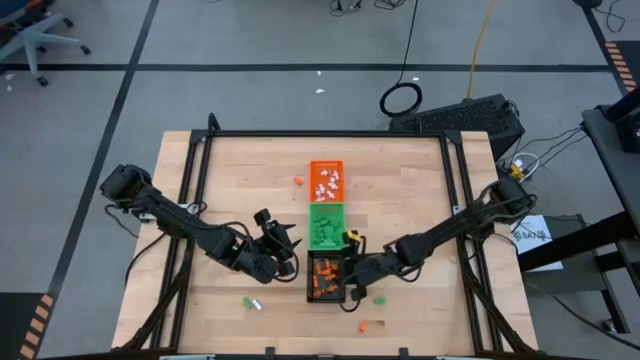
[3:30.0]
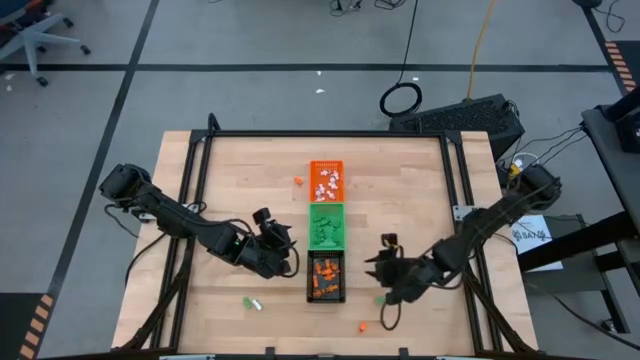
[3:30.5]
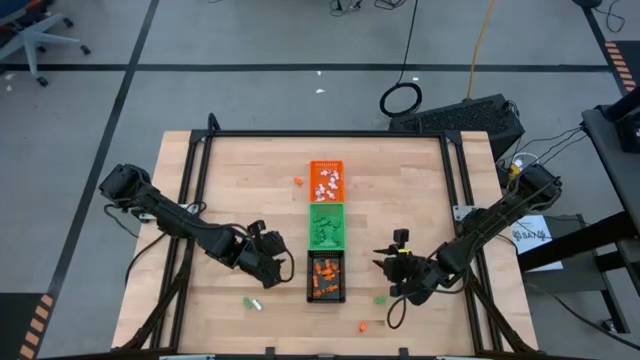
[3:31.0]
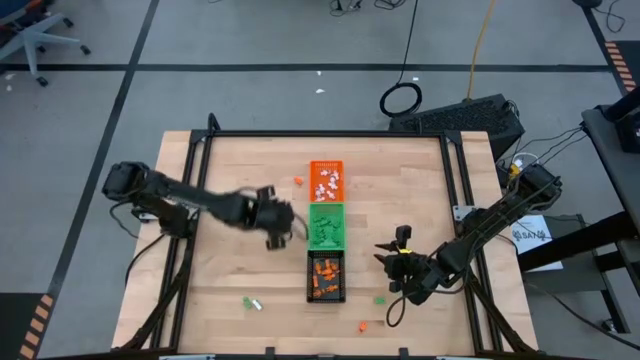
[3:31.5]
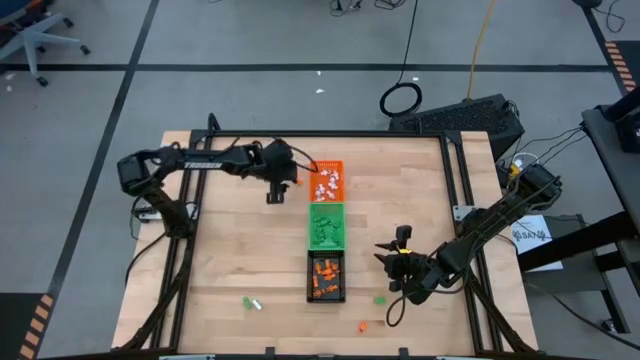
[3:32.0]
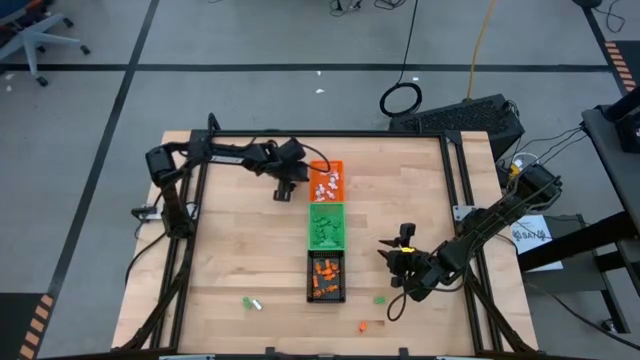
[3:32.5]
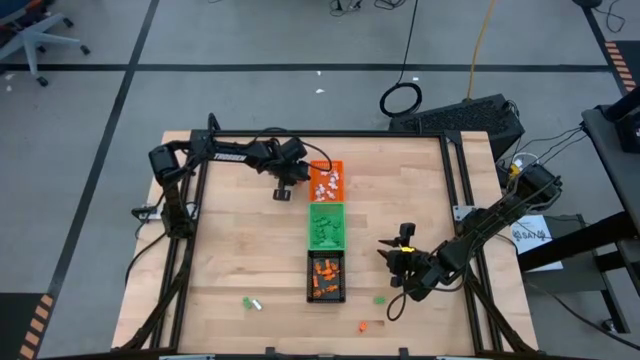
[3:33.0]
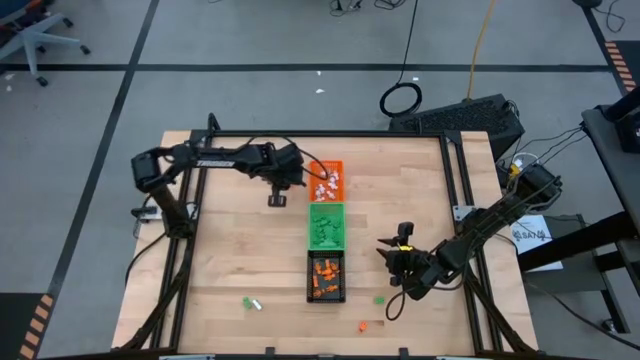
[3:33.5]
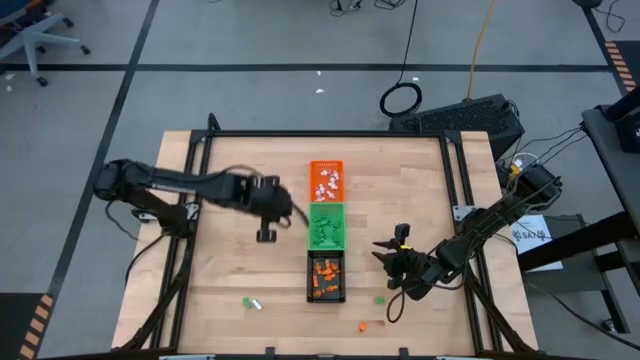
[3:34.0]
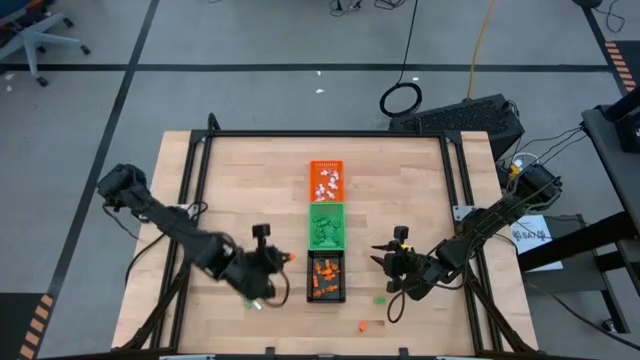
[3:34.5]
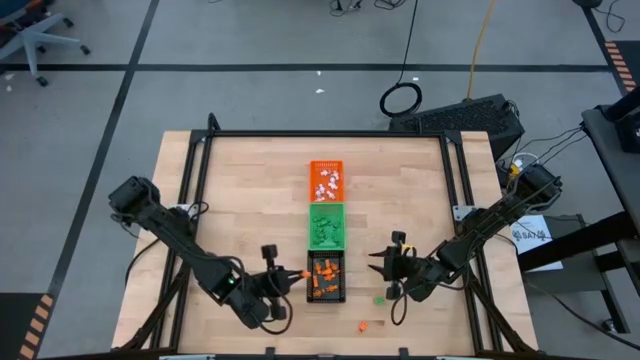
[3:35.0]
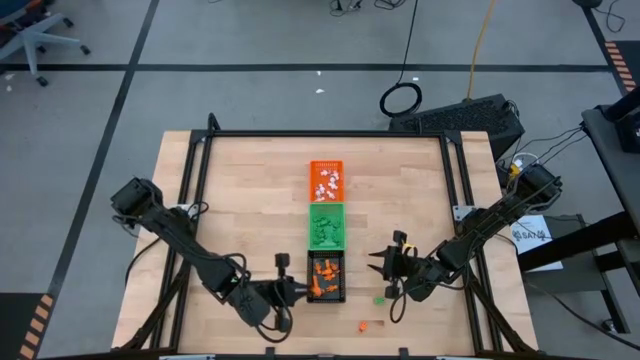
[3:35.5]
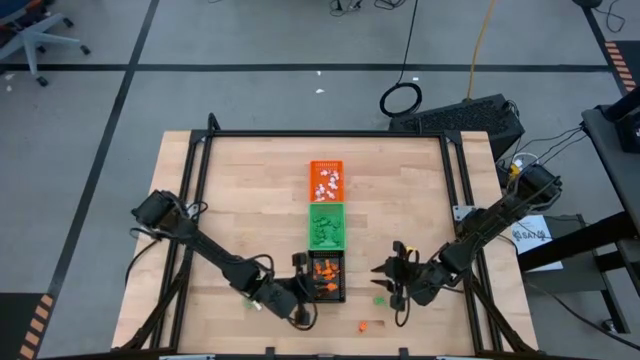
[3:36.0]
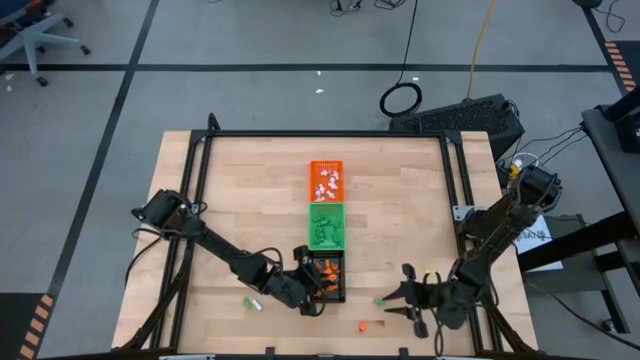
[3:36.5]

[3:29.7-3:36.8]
Task: Sort Halloween decoration
Put the orange skeleton toy into the black bin

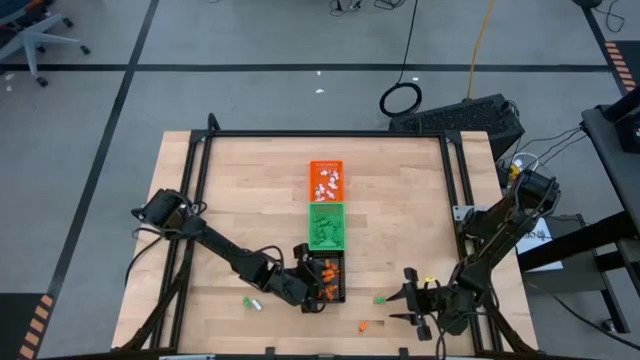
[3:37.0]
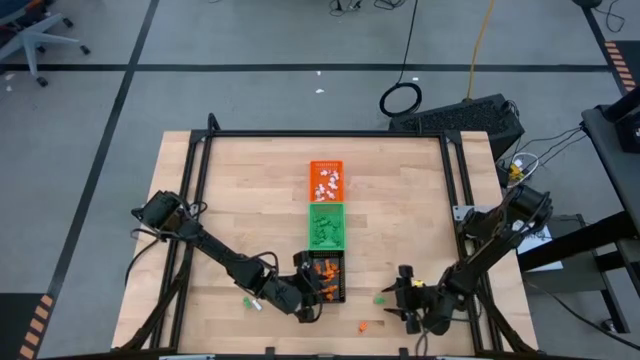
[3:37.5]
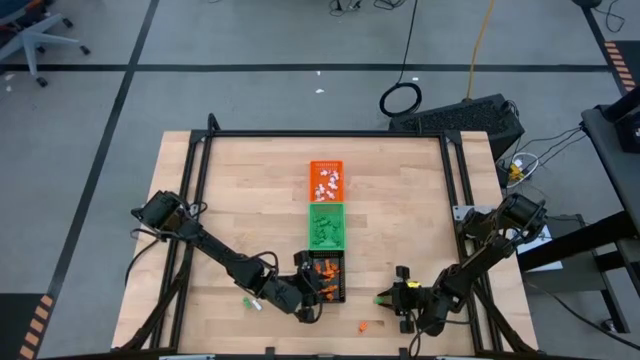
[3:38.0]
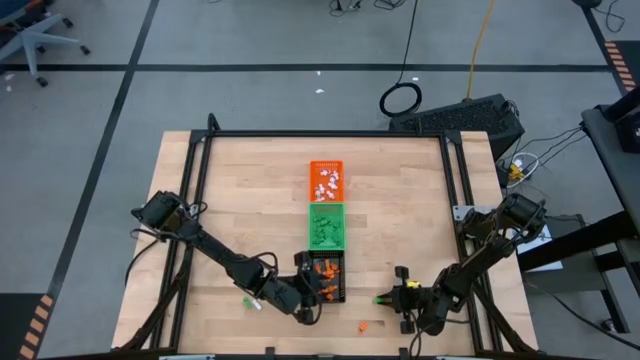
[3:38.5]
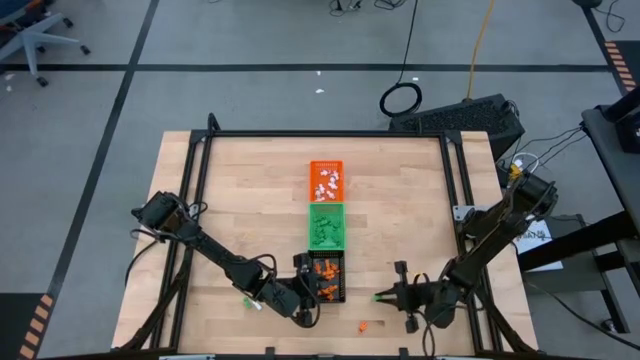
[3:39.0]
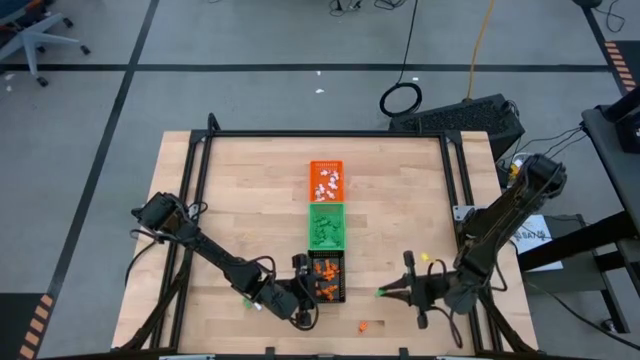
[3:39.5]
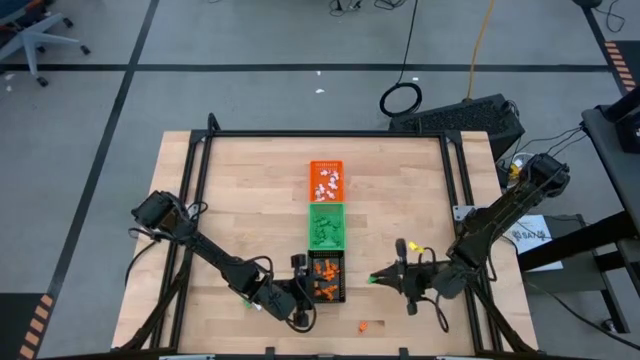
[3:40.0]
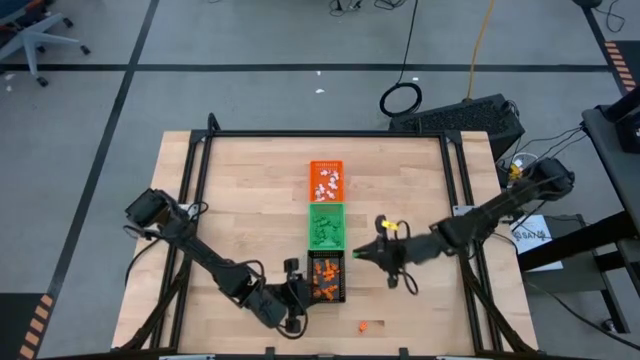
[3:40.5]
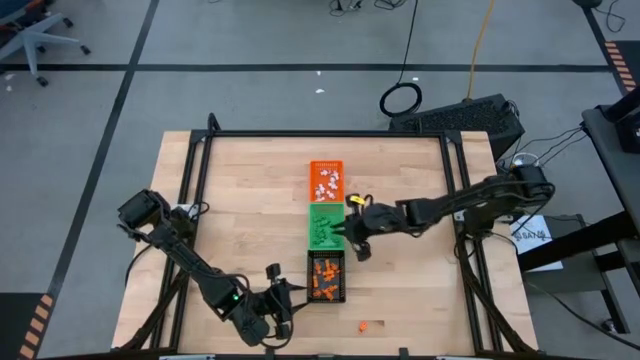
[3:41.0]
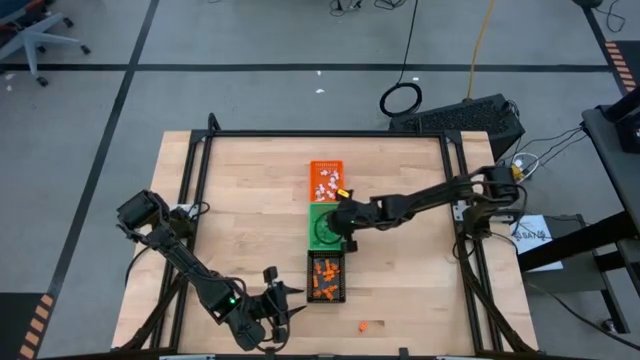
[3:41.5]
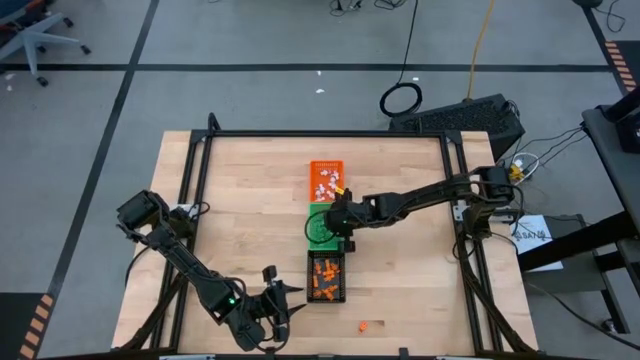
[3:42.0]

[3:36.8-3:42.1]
Put the green skeleton toy into the green bin

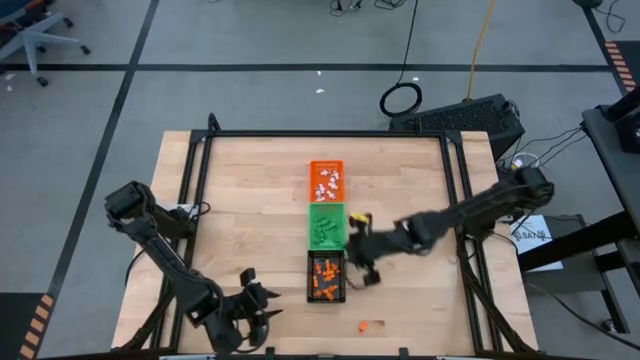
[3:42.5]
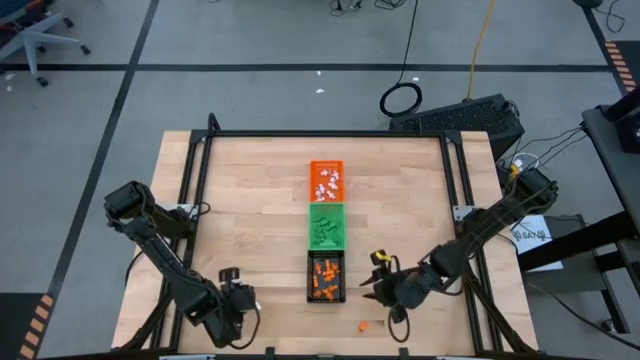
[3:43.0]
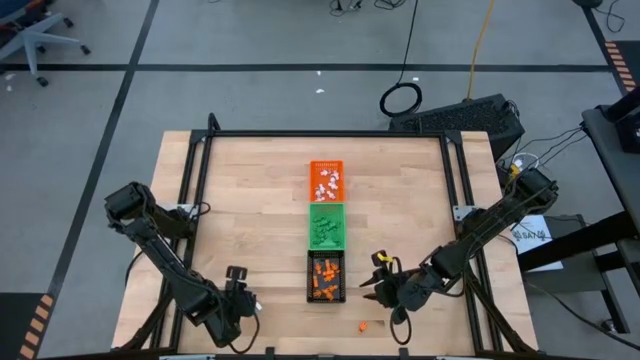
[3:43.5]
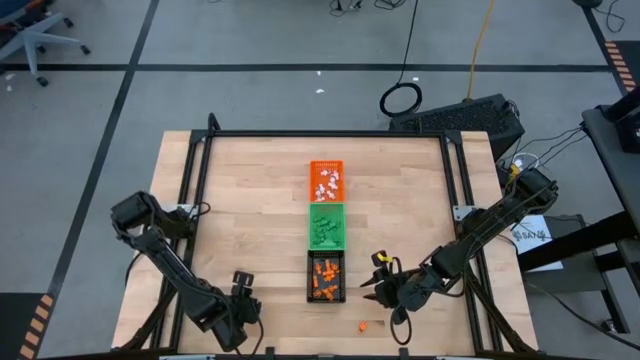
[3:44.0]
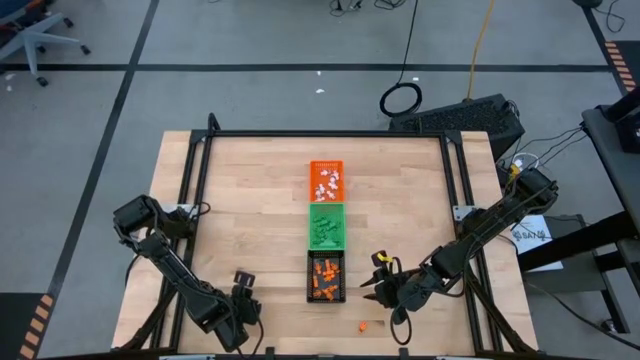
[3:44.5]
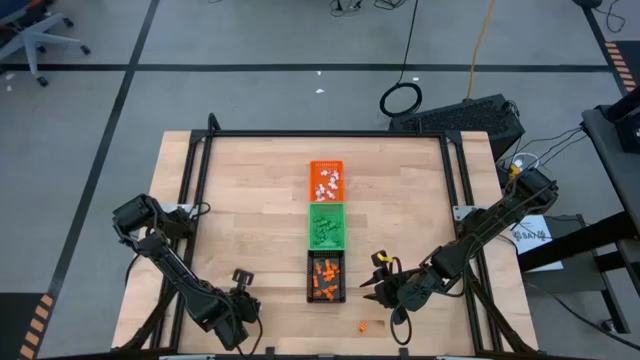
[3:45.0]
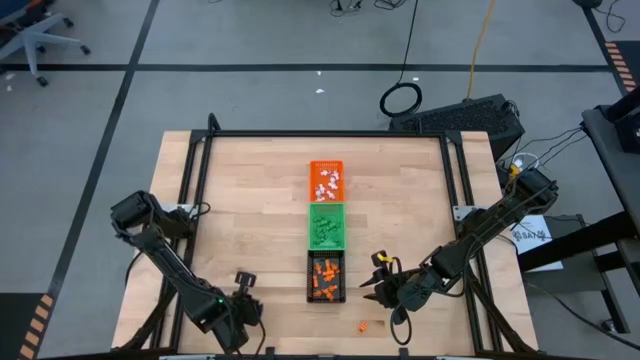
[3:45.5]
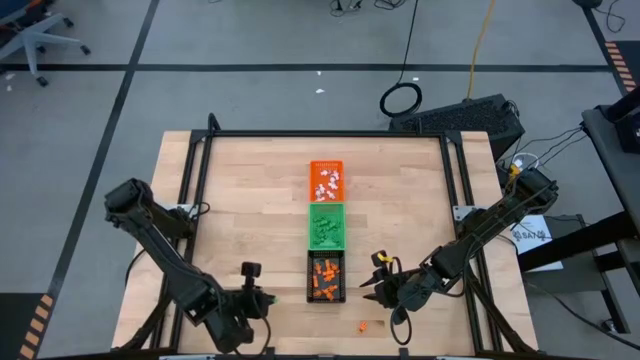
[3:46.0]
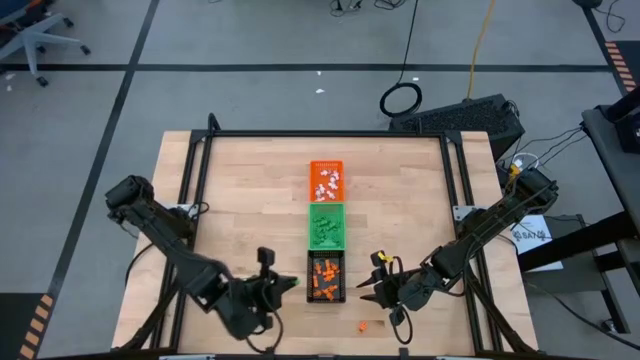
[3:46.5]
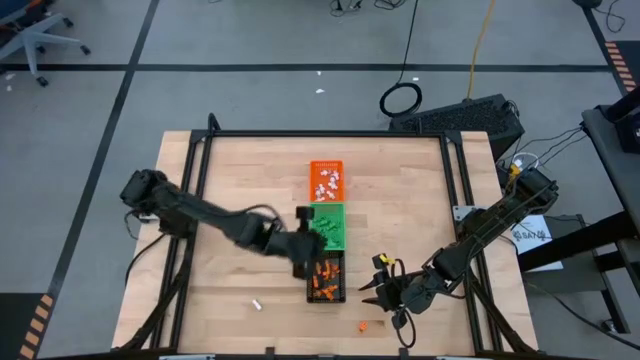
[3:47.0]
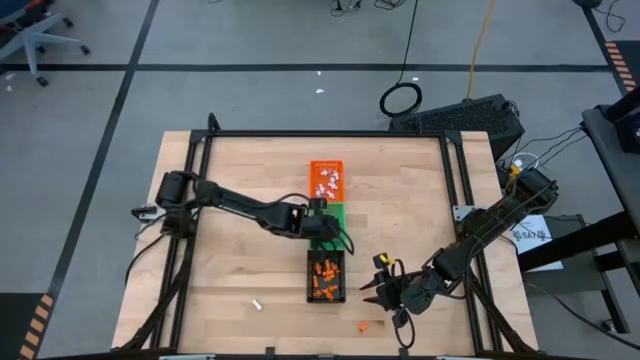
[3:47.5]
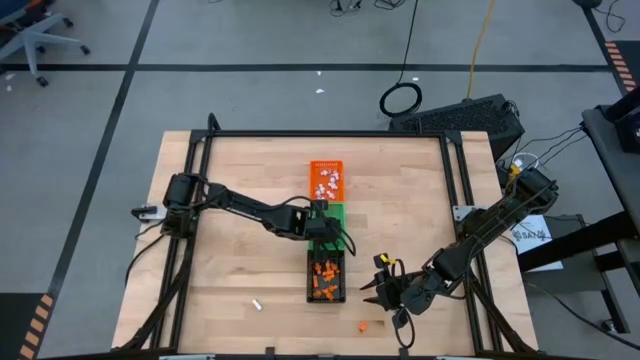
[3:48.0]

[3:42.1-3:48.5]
Put the green skeleton toy into the green bin

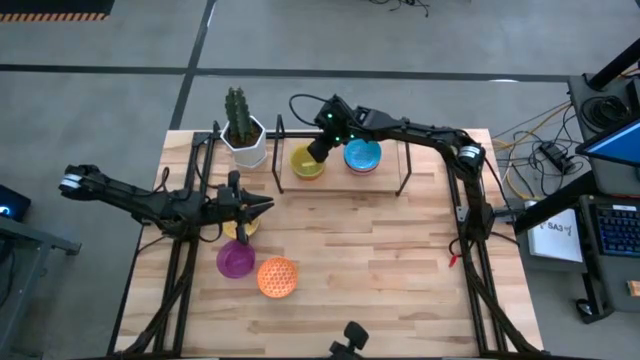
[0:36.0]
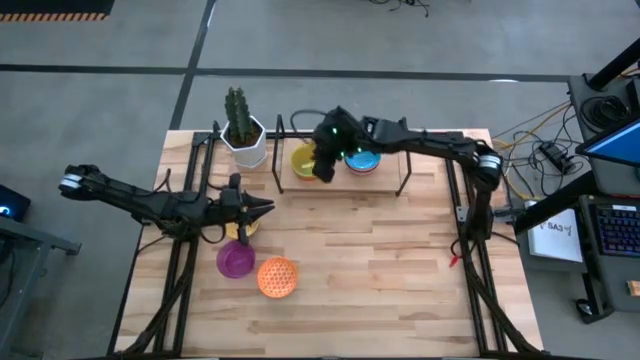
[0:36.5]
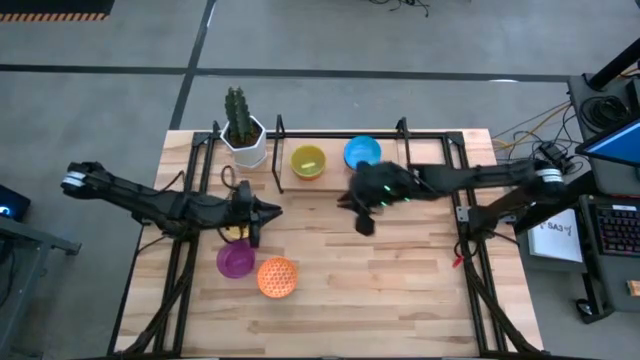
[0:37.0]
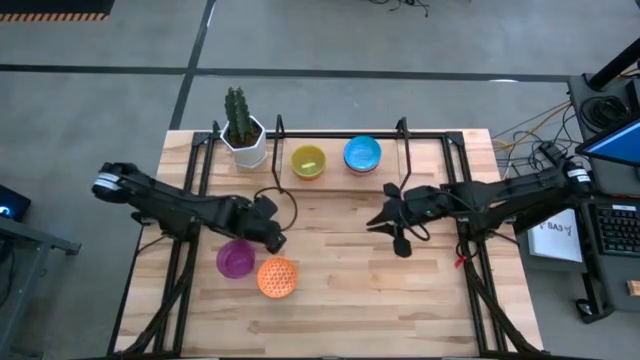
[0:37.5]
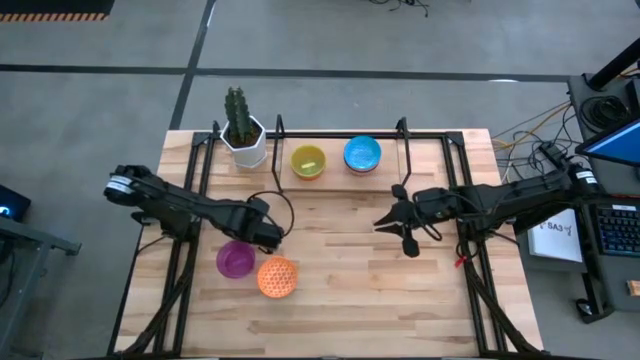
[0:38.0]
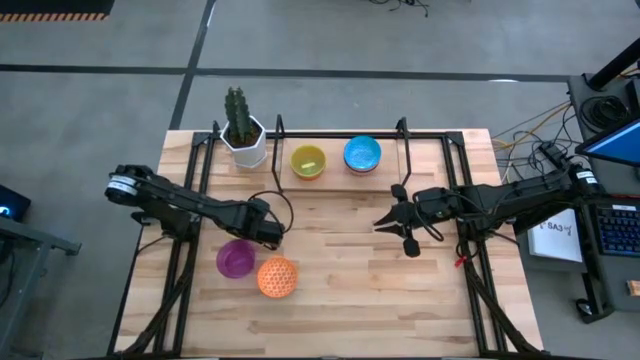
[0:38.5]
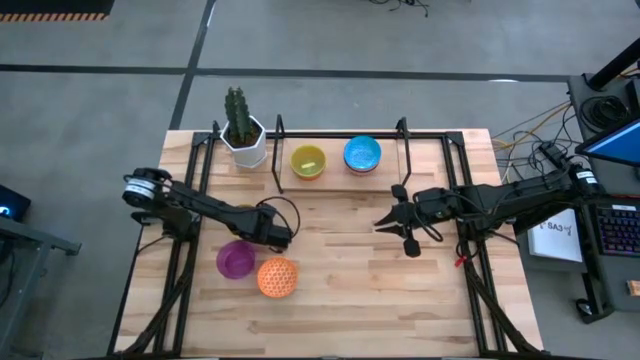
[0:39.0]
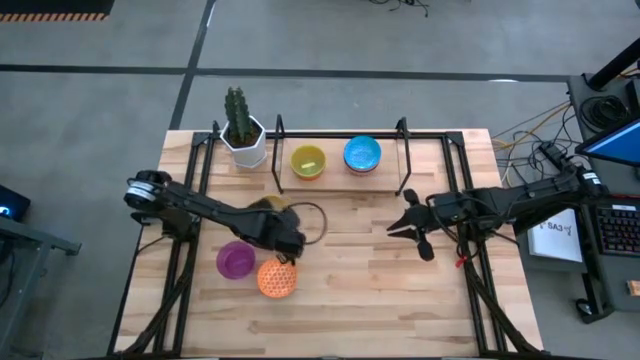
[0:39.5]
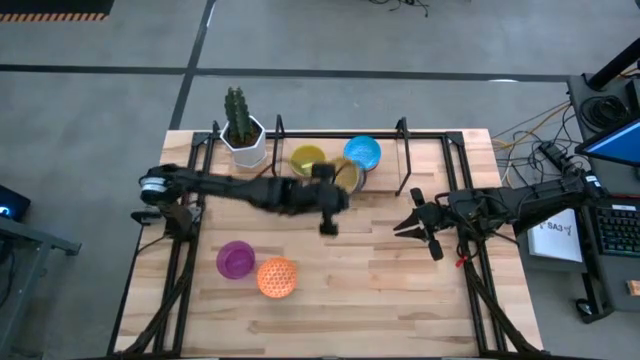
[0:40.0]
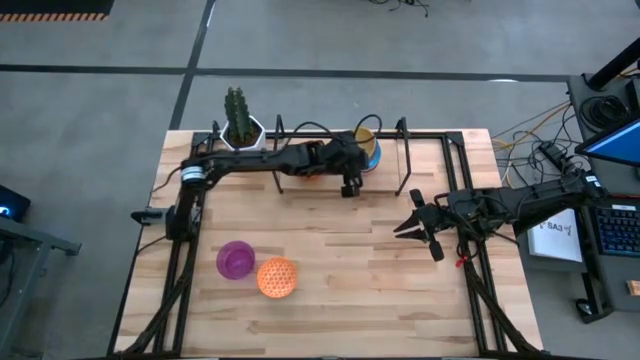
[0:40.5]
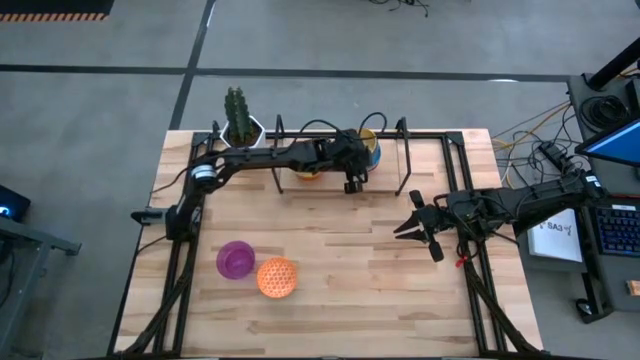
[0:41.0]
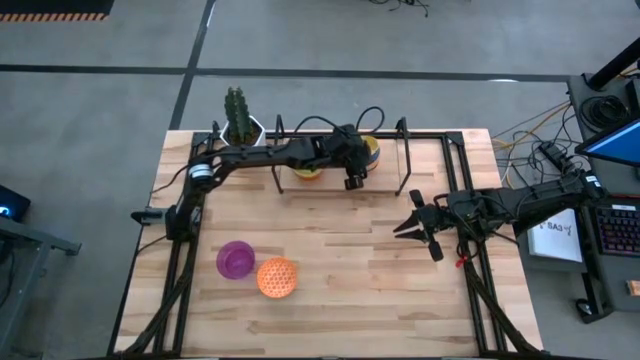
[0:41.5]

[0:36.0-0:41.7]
Task: Place and stack bowls onto a shelf
Stack the yellow patterned bowl on the blue bowl on the shelf
